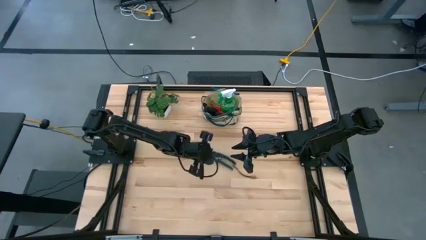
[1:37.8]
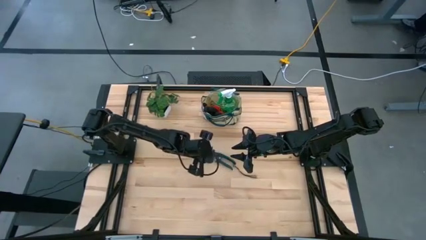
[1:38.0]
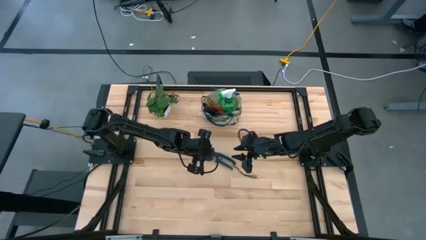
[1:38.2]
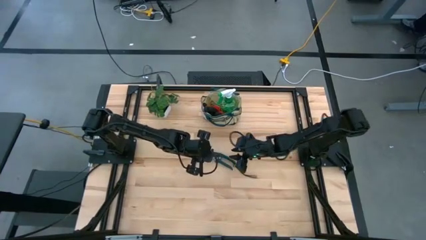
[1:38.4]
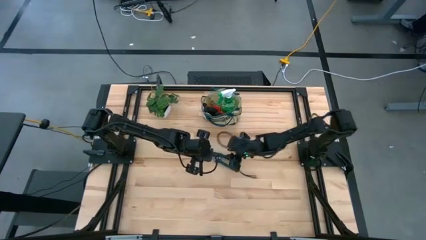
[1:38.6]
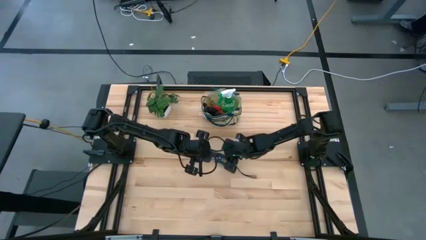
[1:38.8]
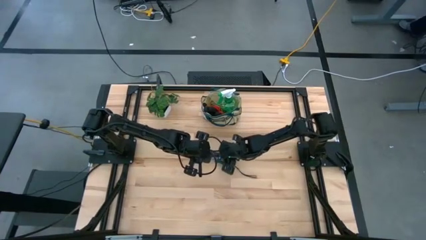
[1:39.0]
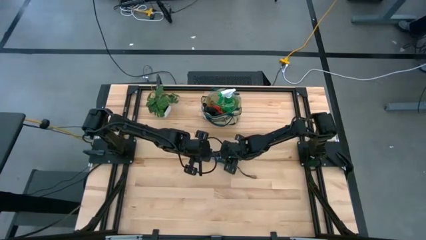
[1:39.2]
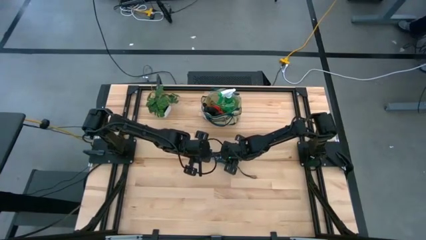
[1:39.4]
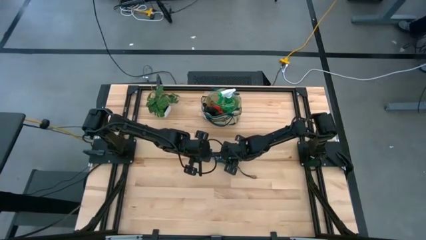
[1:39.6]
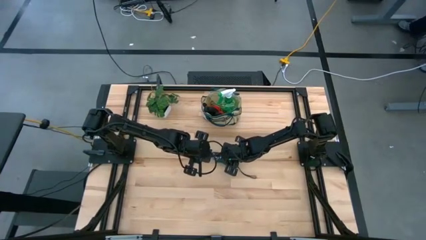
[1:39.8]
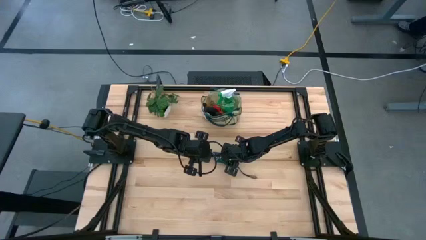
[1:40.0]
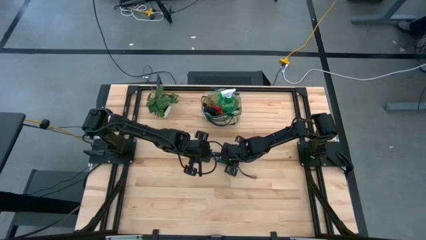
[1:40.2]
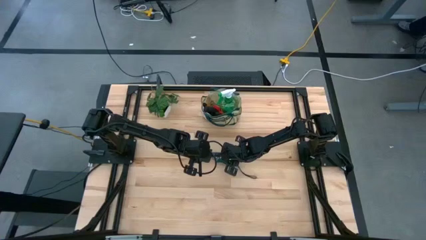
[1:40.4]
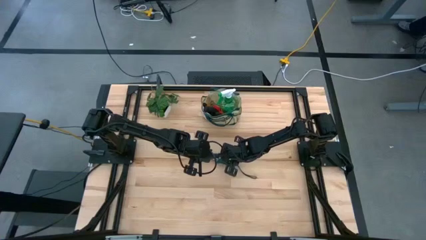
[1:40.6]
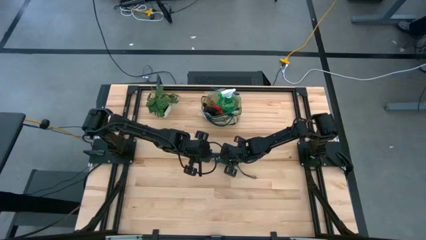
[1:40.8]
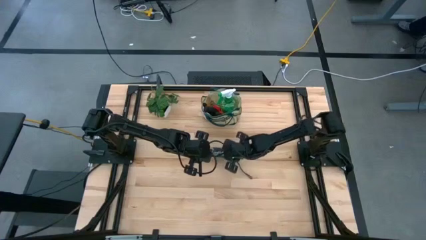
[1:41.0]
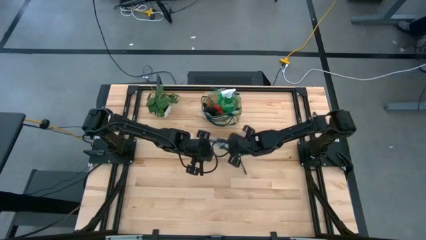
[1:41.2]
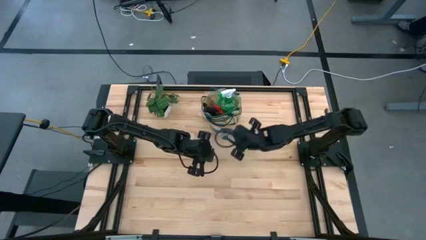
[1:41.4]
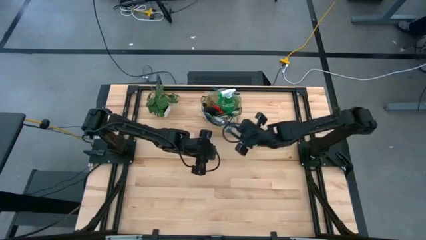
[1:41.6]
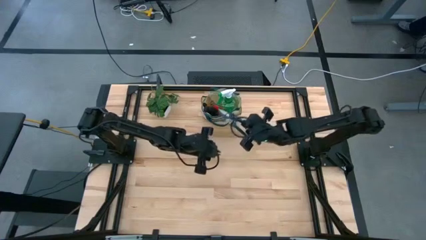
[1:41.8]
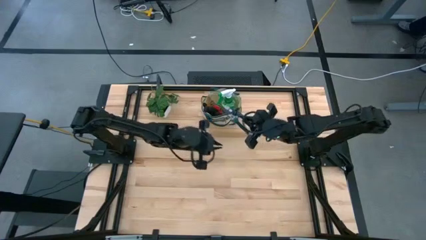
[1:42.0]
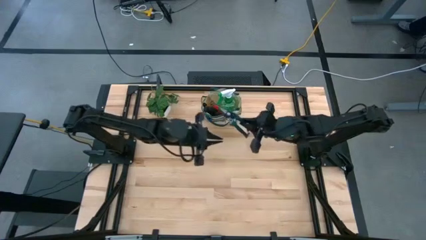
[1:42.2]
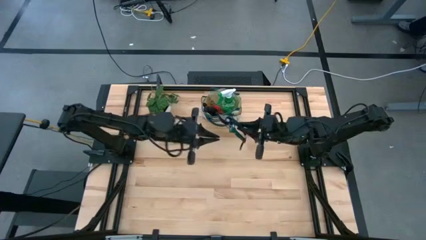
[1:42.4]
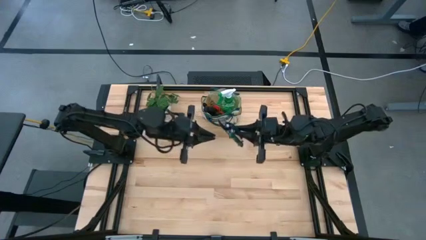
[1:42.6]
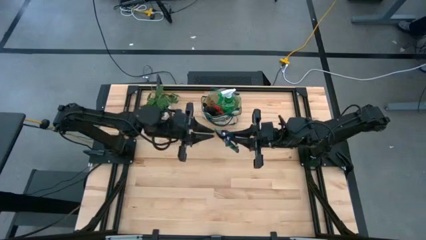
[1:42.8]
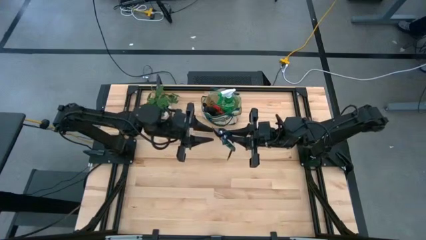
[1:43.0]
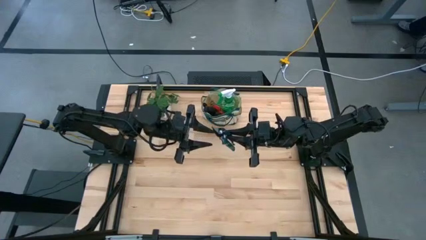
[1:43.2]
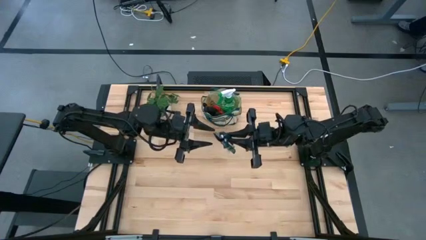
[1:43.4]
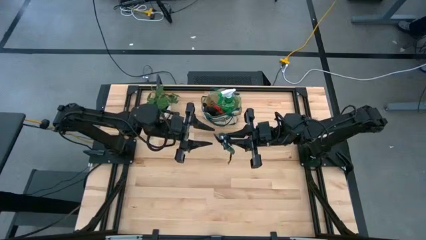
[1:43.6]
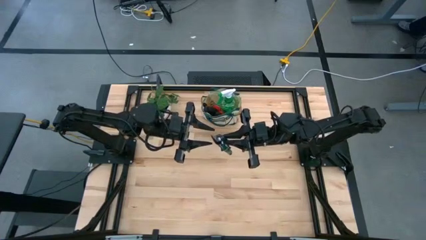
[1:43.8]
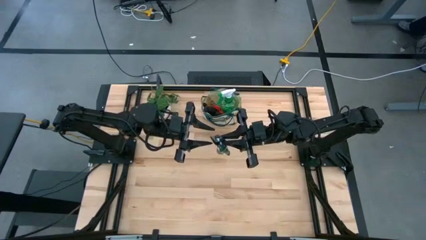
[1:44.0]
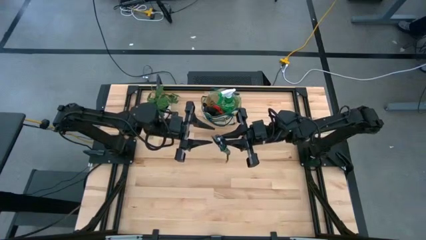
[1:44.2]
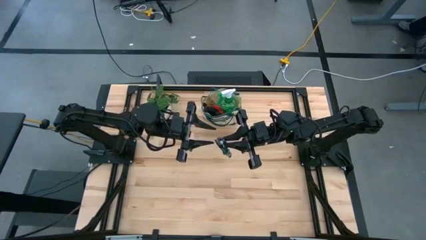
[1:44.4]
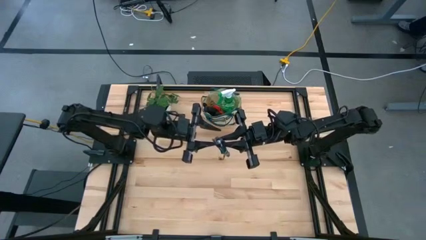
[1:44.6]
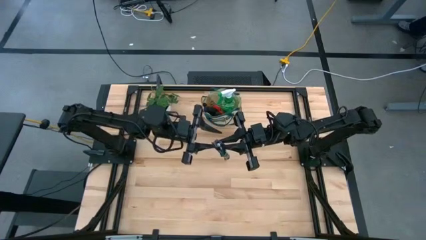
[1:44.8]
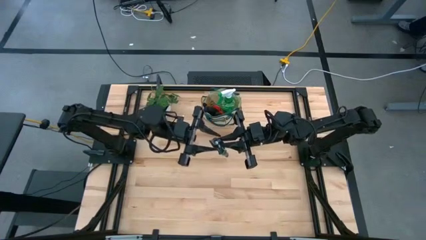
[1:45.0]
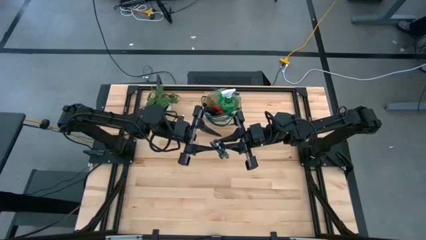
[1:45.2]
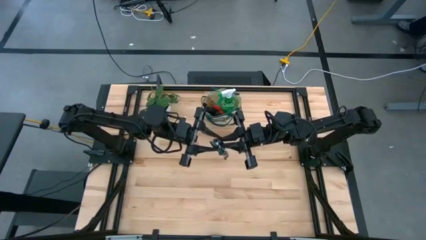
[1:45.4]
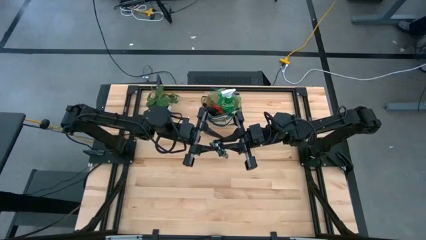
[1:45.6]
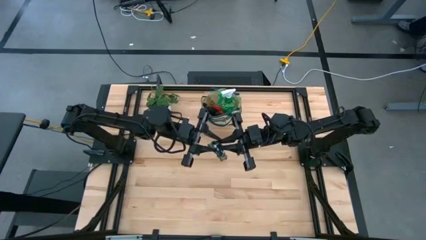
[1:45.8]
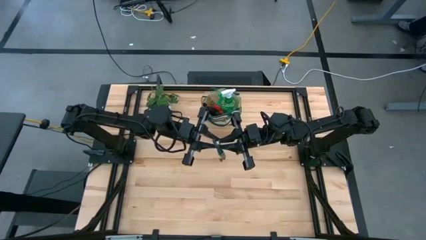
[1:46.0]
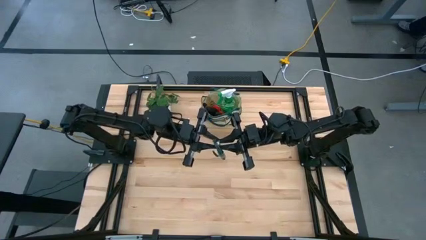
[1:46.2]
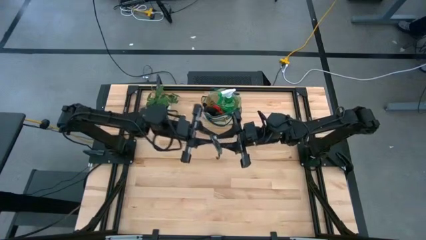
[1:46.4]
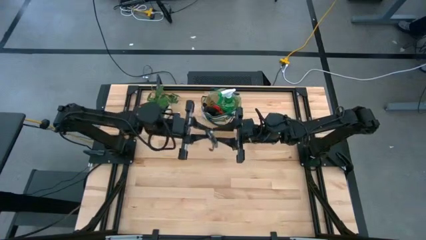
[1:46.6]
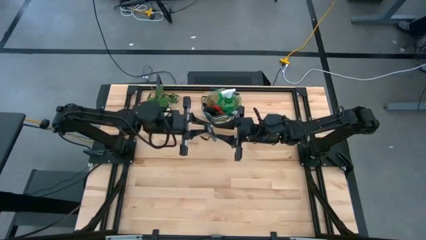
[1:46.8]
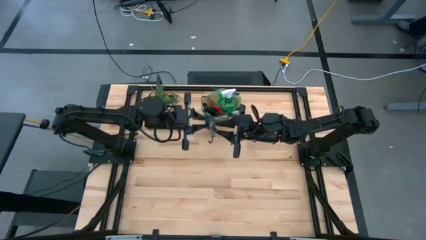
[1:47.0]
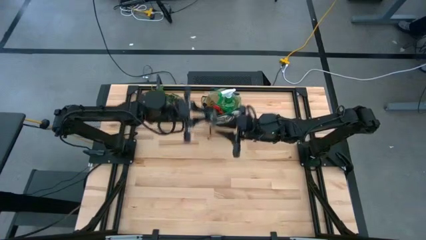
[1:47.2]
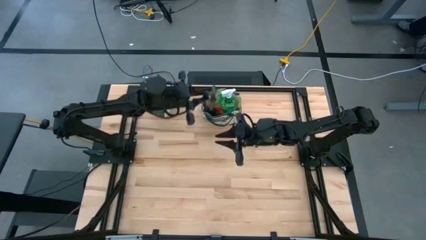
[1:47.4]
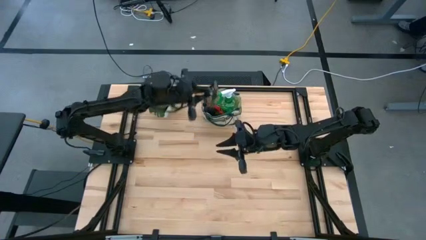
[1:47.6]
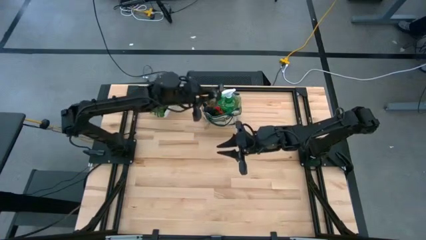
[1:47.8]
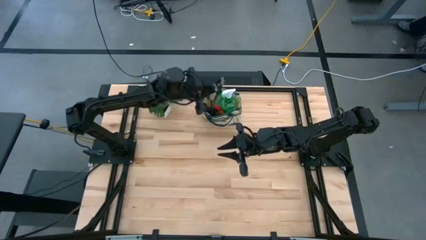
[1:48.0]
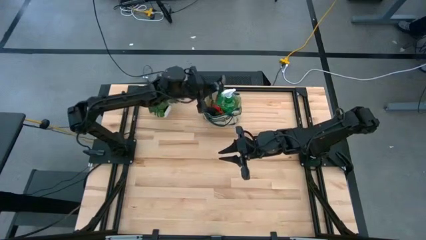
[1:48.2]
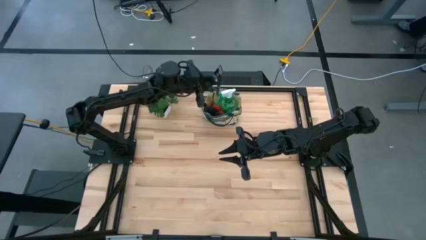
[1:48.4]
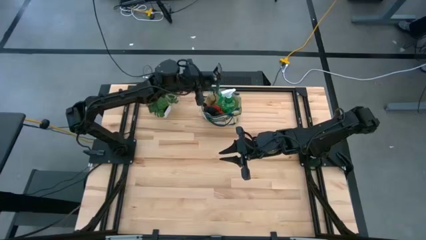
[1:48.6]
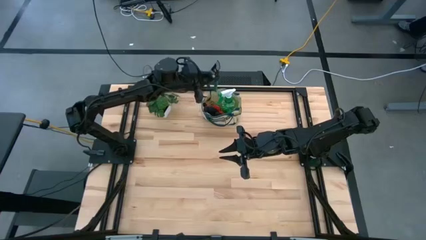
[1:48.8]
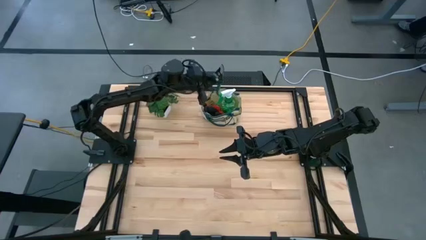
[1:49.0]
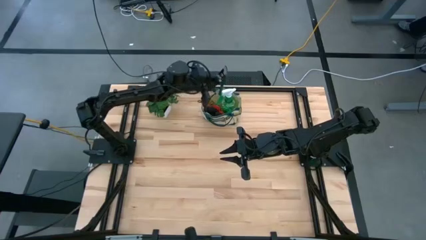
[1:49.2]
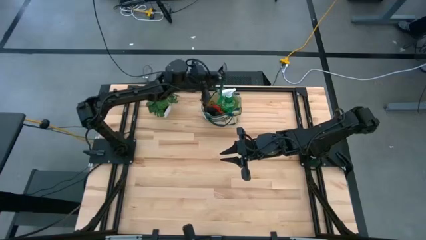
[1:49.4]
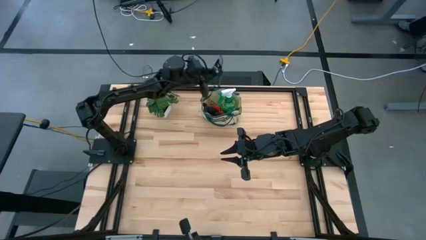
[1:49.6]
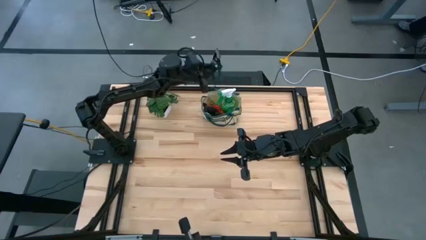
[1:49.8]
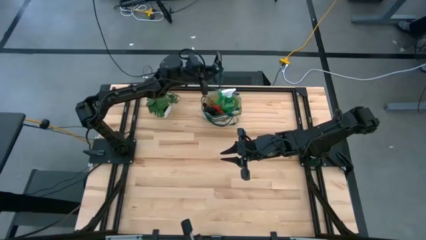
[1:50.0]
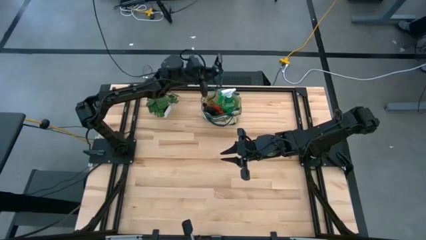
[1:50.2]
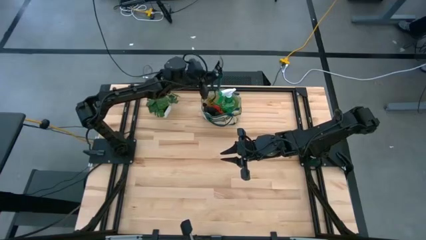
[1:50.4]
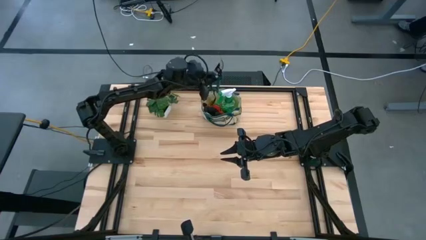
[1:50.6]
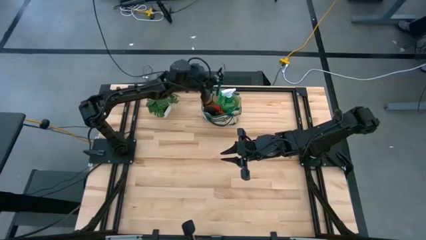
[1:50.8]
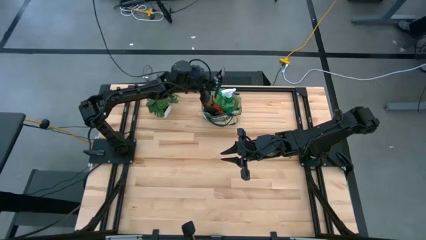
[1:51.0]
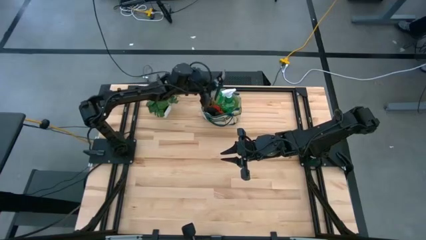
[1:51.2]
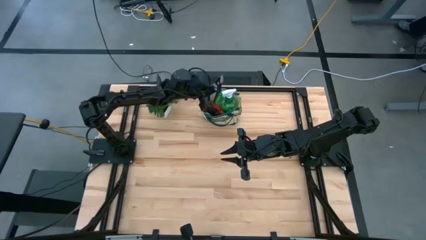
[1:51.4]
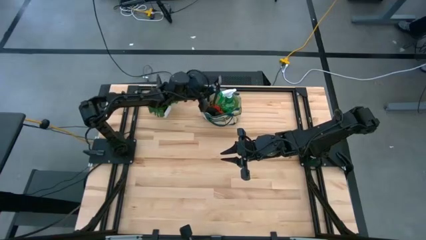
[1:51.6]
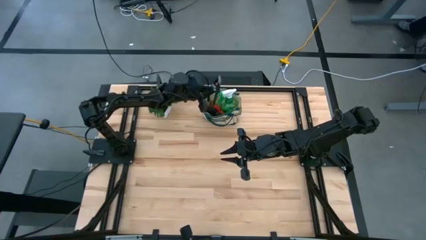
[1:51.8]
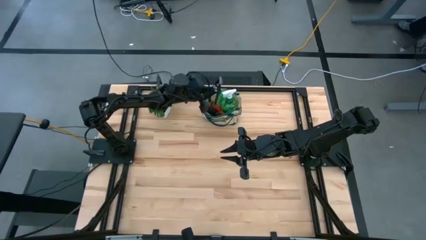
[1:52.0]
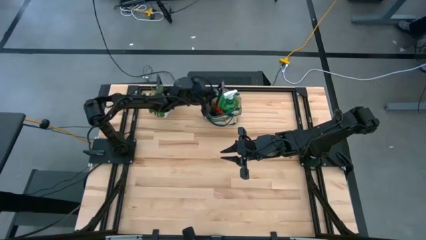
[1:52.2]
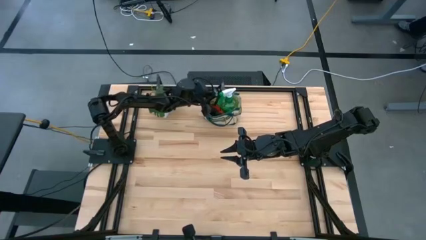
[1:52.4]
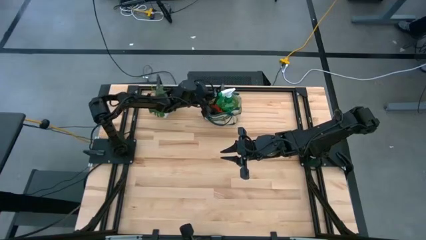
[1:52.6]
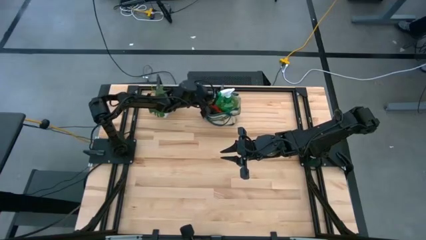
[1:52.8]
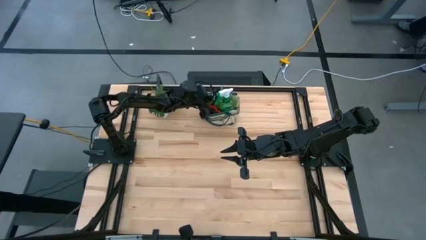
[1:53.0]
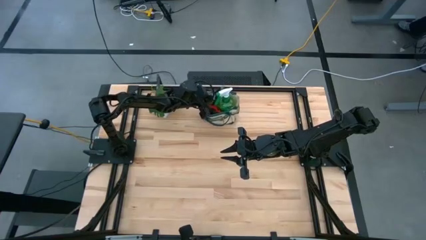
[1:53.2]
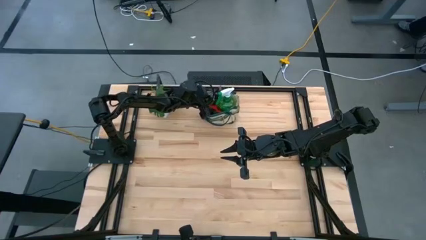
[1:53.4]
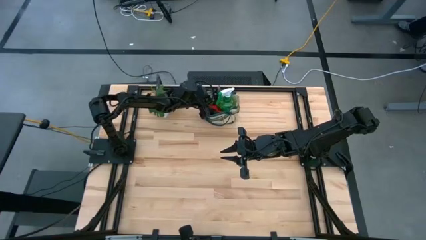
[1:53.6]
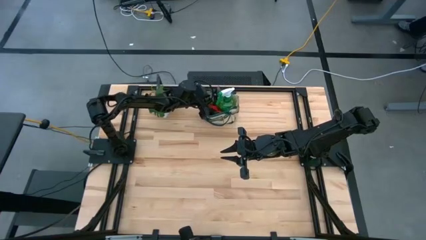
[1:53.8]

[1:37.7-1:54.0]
Task: Pick & Place Garden tools in Gardening bag
Put the green garden scissors into the gardening bag
